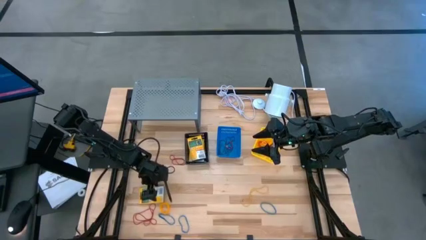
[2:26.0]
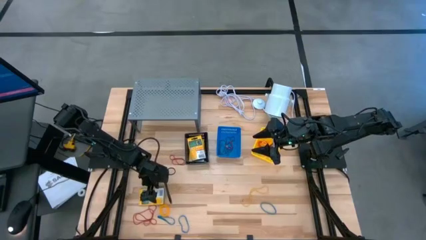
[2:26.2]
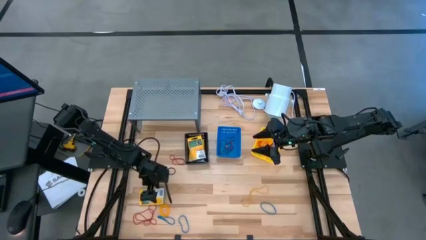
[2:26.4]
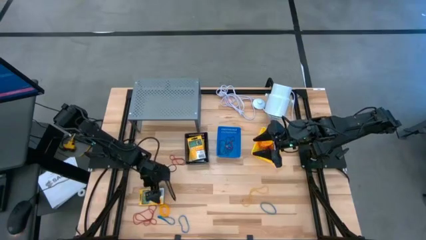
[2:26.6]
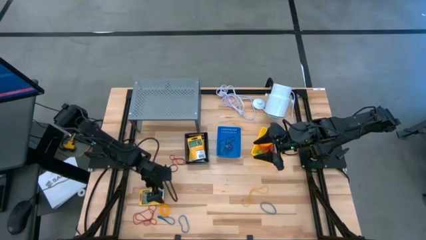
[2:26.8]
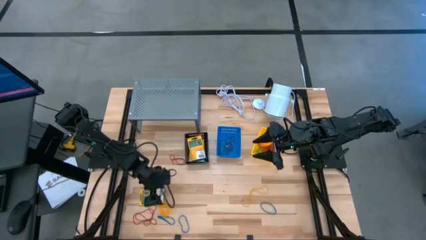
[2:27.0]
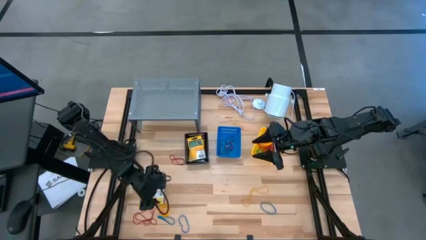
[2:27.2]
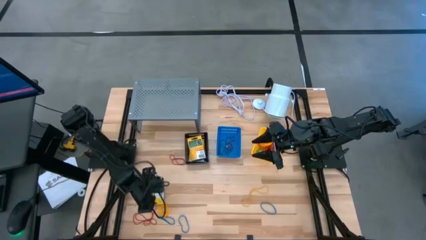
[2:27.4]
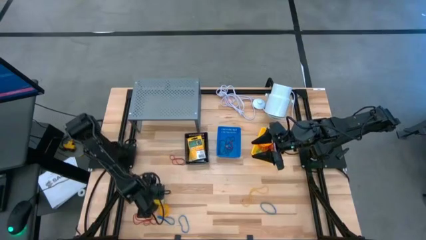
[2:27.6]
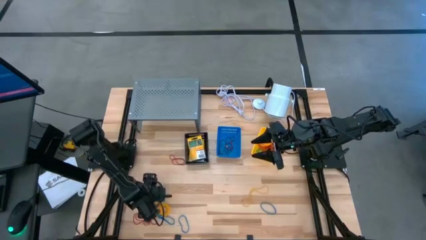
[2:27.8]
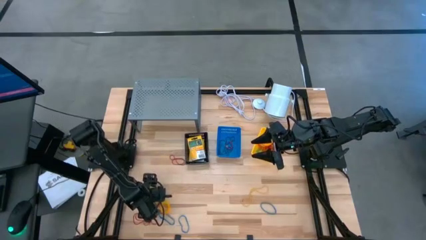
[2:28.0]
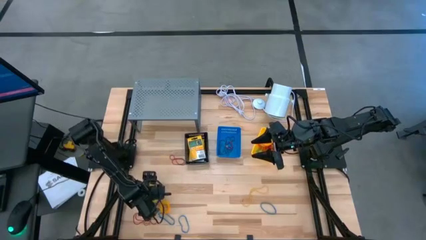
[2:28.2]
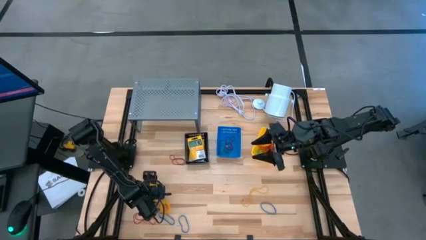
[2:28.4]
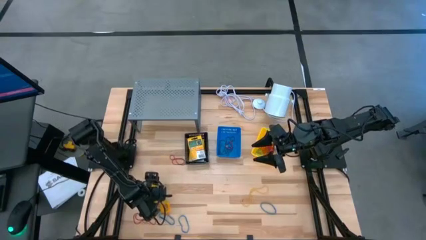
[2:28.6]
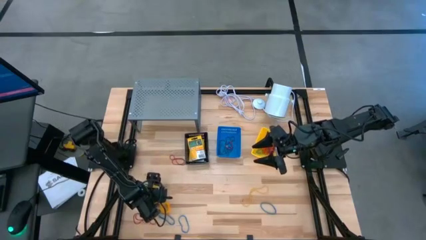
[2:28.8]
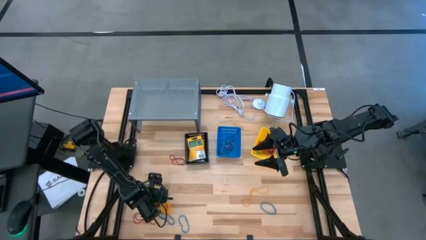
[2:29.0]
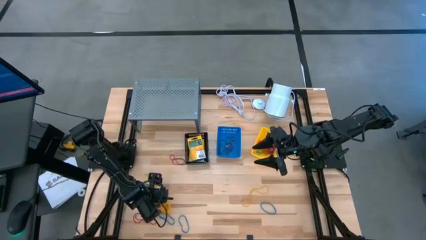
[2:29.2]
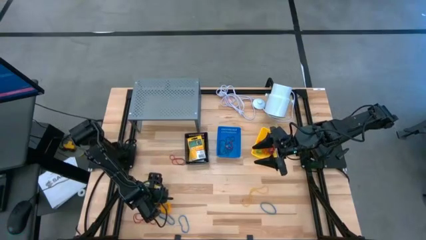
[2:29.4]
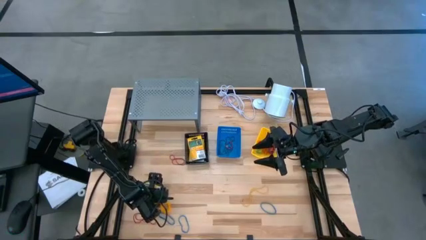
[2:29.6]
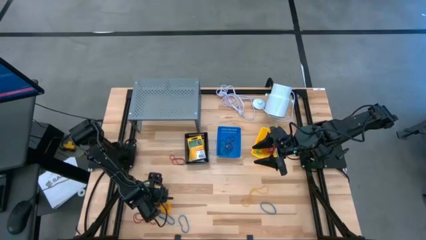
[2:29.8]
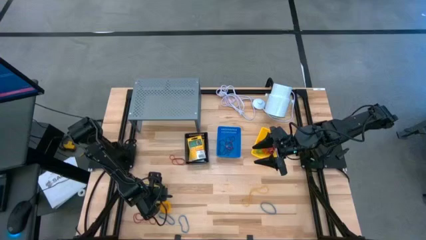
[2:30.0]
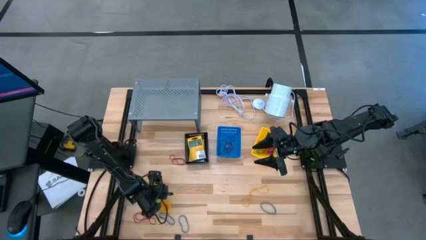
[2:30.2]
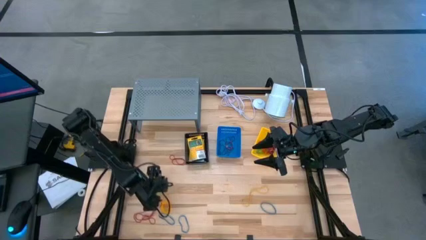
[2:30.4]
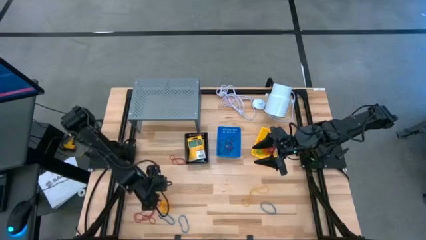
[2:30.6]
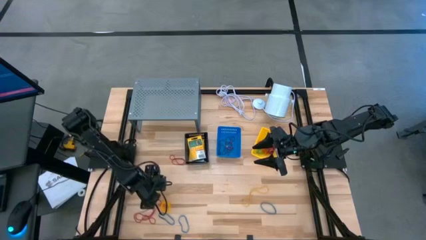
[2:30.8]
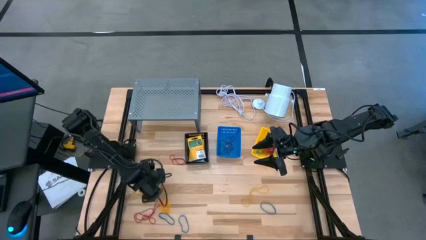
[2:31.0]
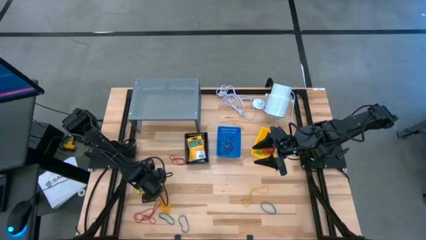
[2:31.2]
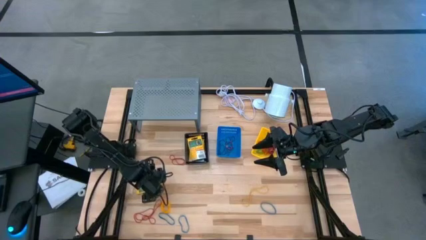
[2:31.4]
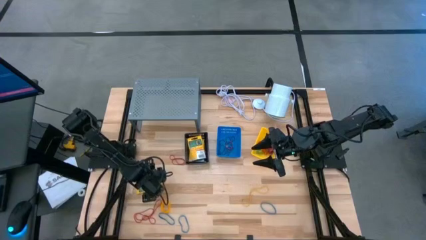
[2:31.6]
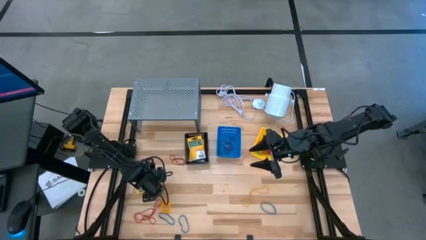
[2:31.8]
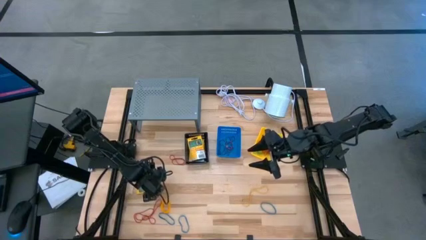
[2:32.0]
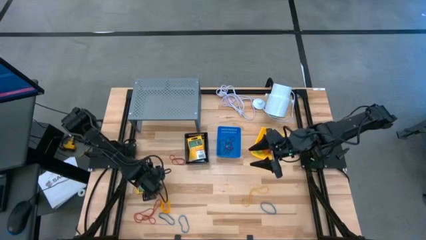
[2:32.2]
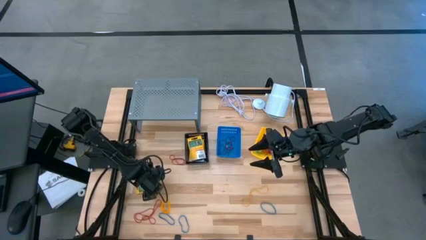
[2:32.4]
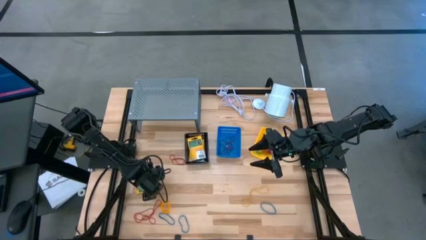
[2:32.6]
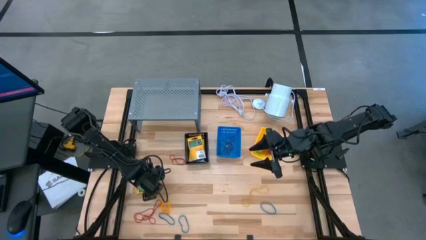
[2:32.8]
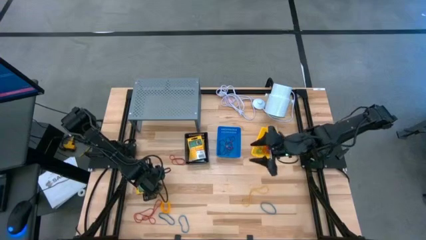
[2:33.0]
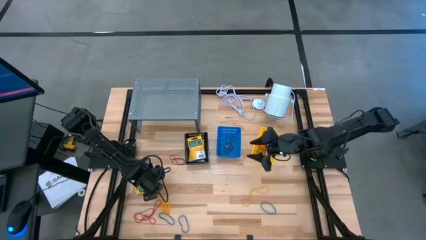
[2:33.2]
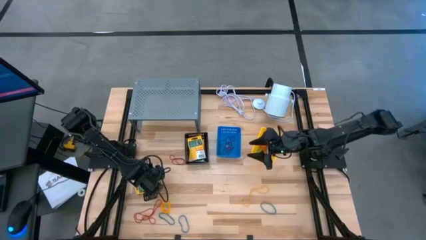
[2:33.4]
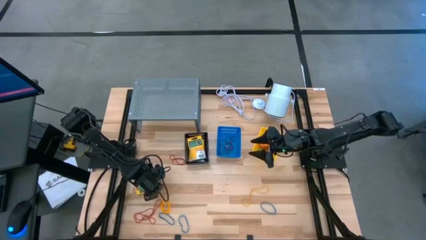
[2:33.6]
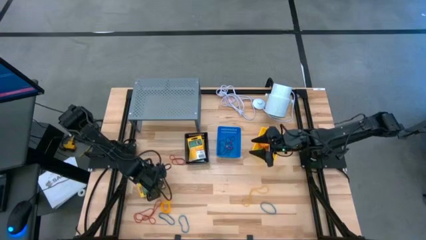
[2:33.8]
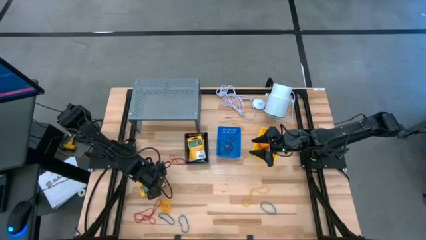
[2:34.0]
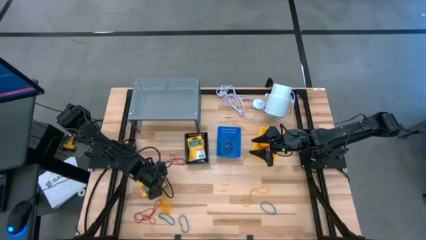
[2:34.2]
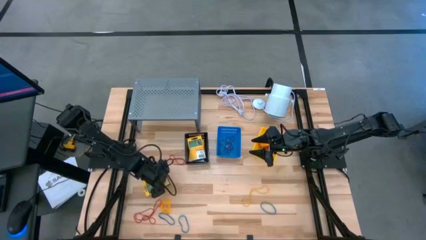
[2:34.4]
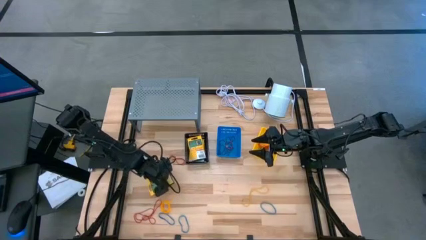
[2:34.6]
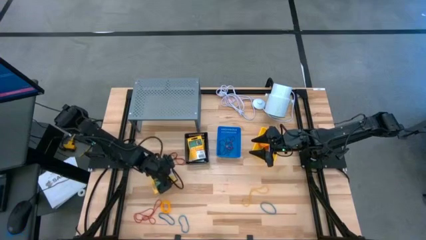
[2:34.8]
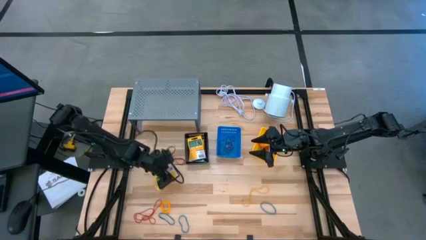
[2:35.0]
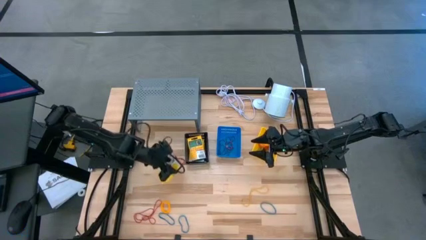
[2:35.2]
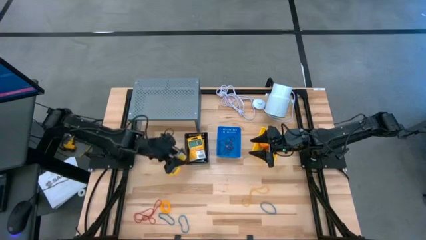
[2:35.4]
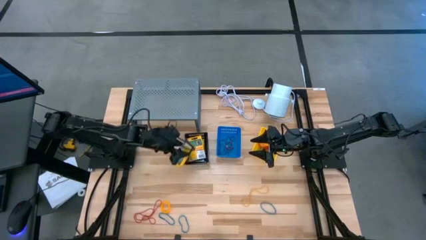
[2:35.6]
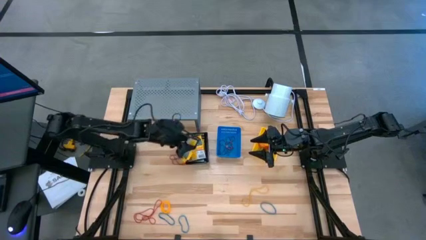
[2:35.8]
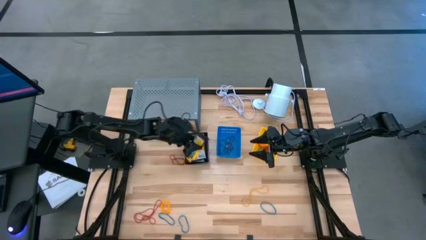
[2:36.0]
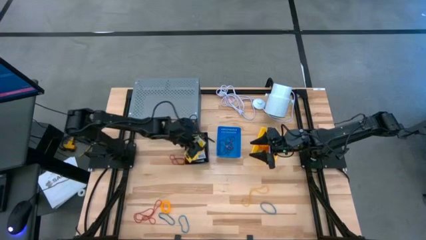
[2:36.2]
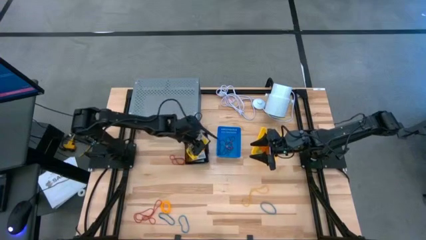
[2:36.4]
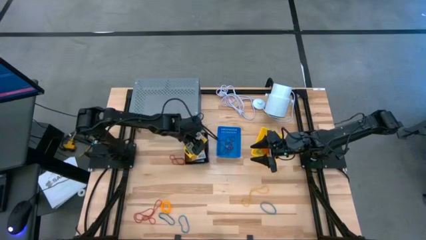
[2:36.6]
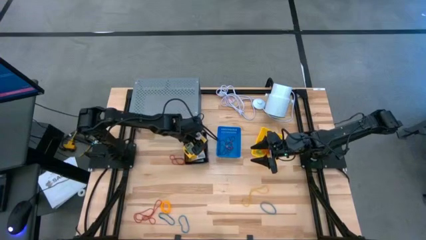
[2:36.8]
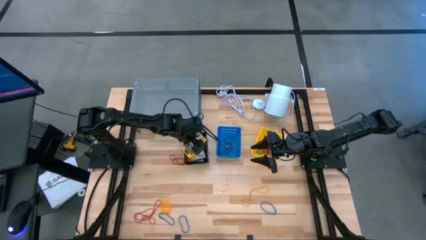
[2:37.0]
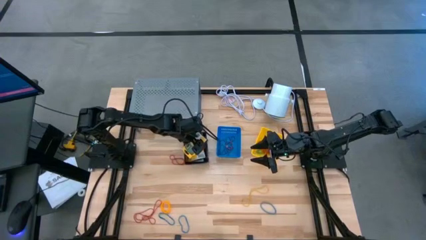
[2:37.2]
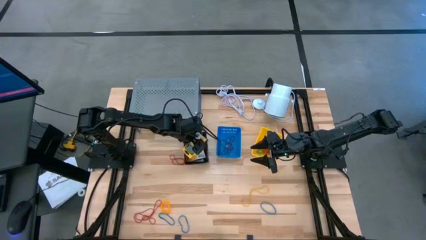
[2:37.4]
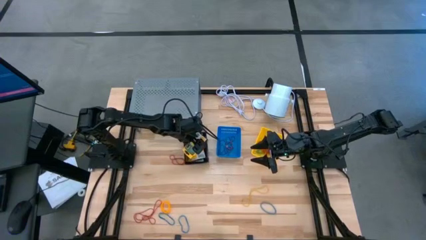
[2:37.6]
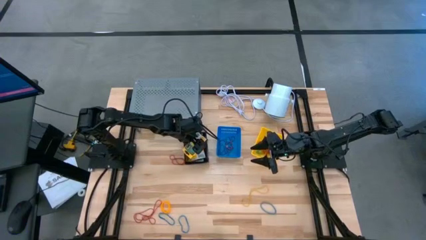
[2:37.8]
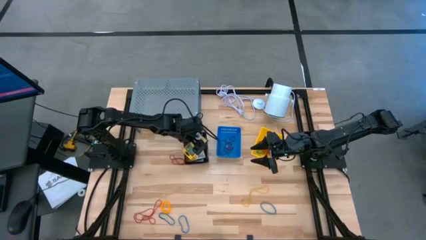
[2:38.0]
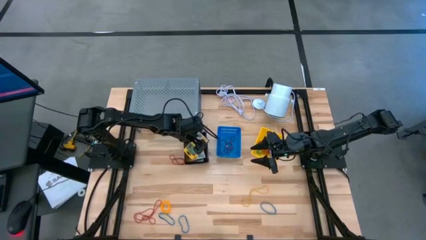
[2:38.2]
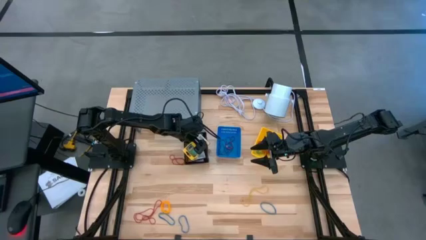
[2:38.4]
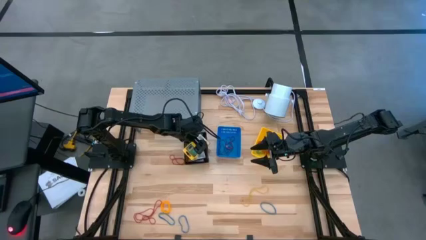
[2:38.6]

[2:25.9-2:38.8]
Task: Pick & Place Office Desk Supplies
Put the crayon box into the black basket

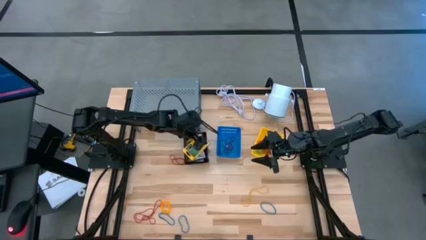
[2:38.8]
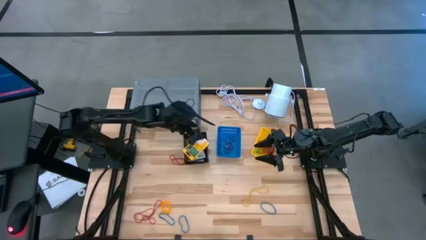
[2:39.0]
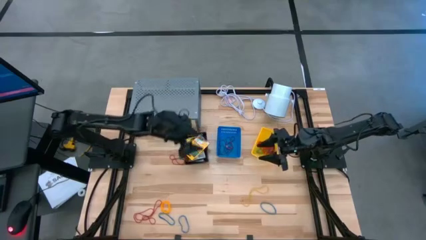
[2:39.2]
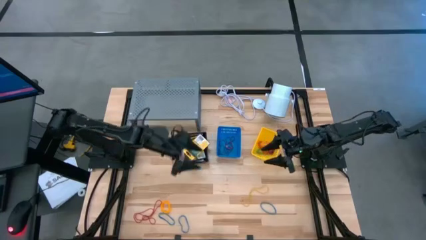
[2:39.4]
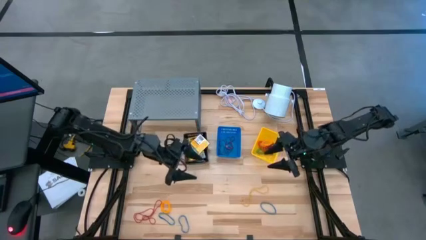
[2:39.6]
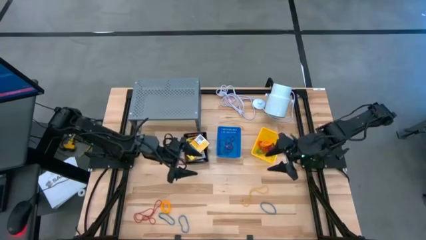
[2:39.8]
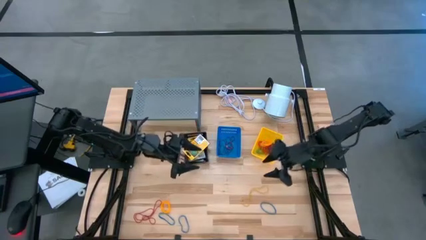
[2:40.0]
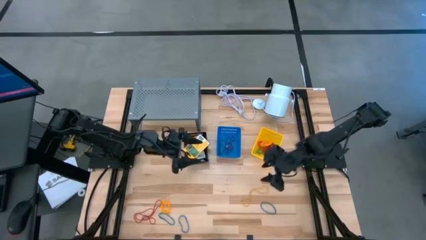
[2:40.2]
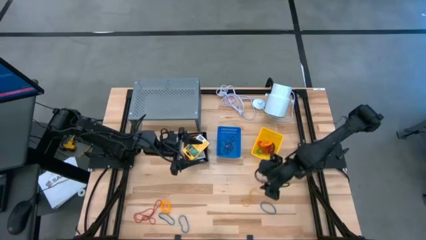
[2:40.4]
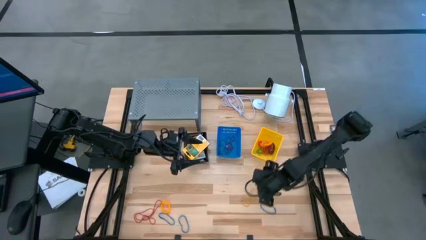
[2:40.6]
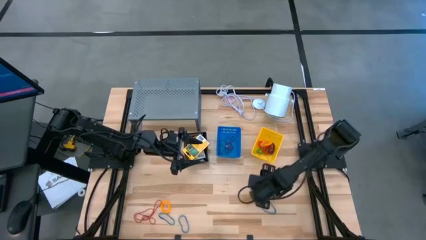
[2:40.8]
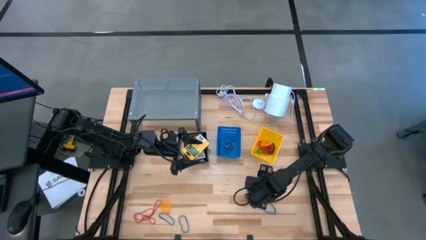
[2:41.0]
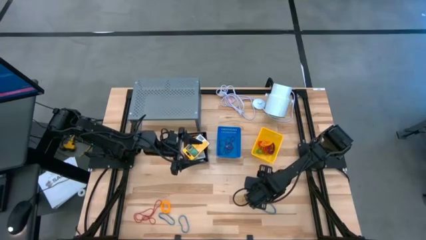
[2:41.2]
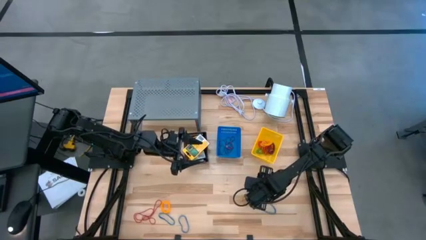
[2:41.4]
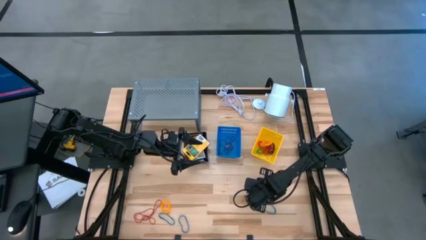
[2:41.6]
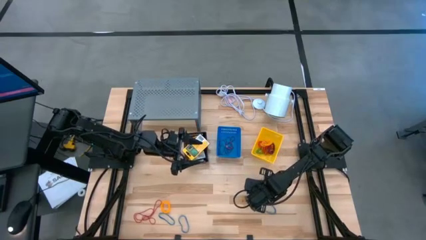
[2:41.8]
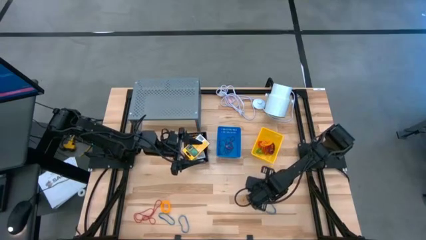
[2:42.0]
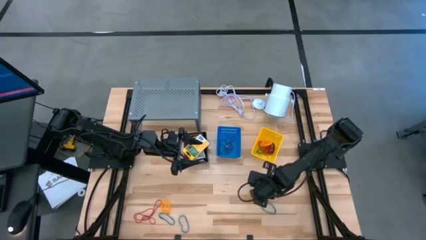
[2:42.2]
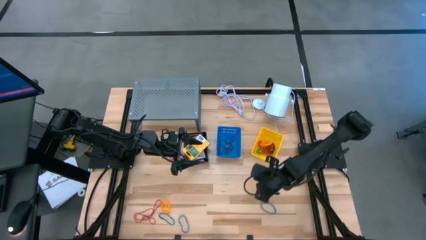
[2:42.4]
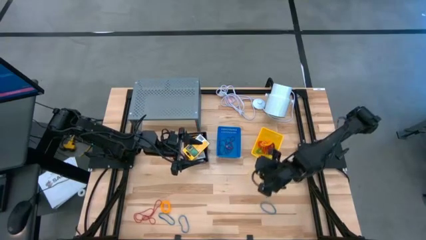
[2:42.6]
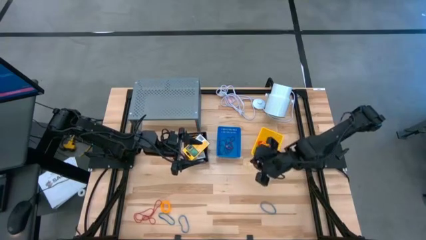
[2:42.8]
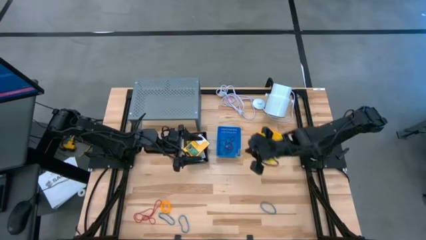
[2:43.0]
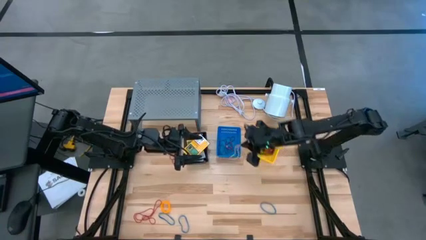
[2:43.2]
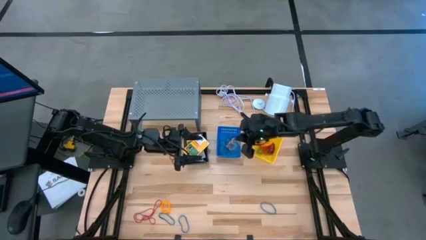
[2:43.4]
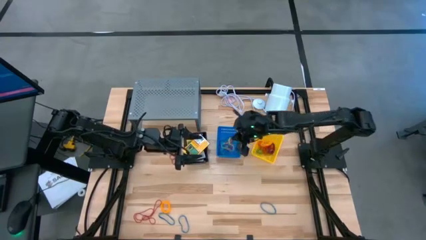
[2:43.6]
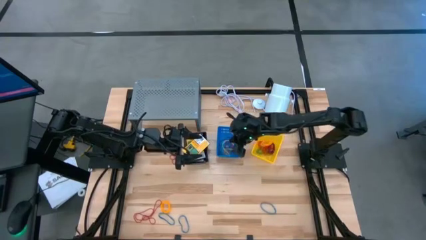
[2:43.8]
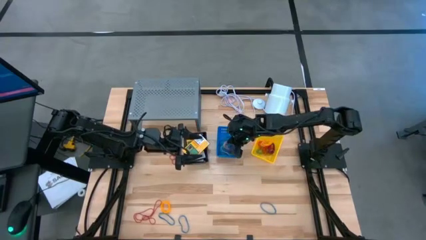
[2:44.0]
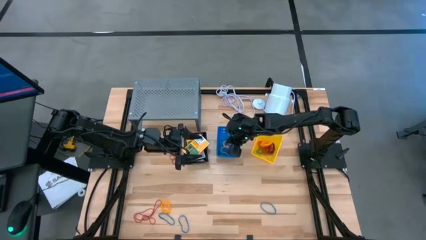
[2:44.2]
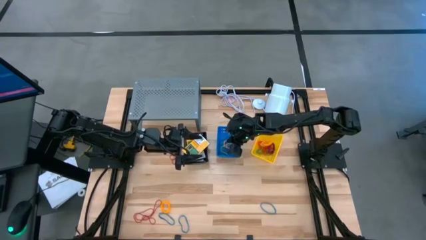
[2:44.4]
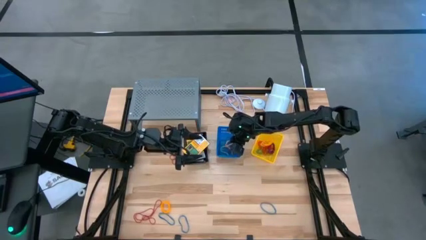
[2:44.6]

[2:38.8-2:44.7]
Put the yellow rubber band into the blue basket
